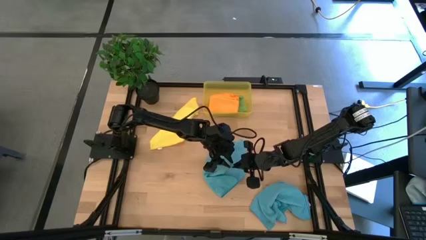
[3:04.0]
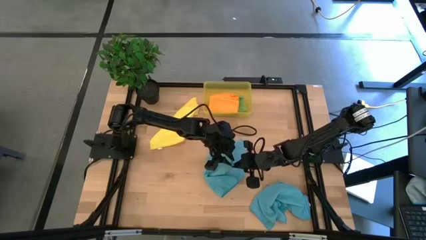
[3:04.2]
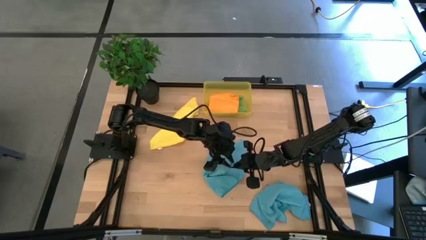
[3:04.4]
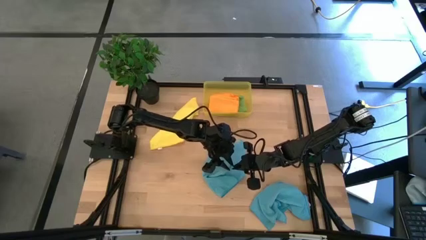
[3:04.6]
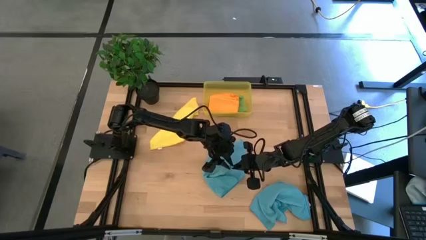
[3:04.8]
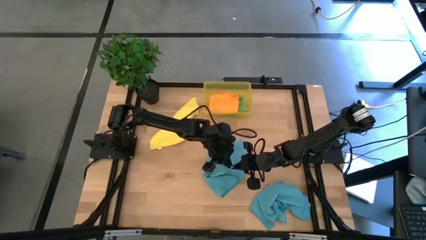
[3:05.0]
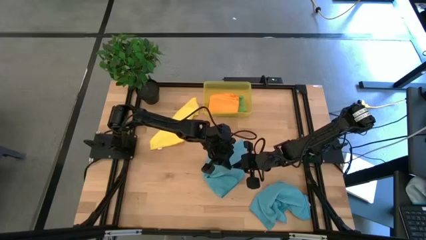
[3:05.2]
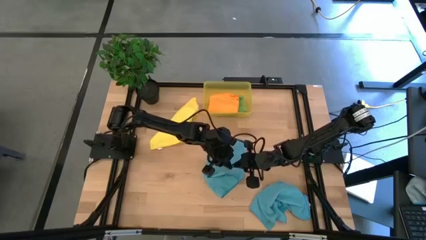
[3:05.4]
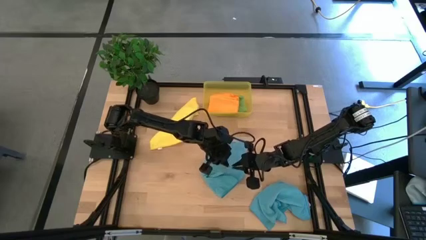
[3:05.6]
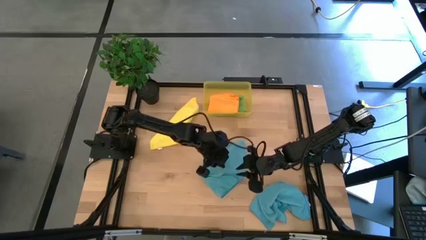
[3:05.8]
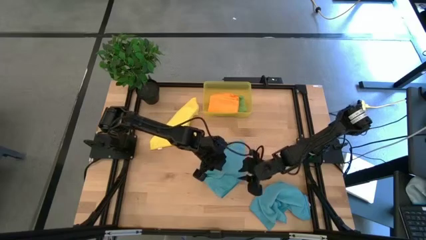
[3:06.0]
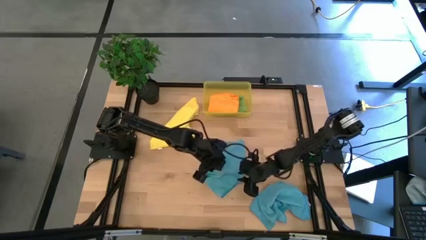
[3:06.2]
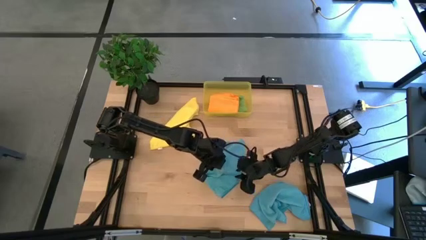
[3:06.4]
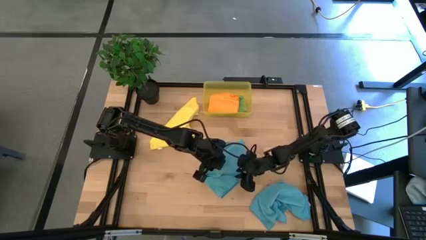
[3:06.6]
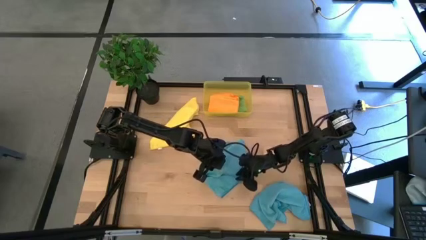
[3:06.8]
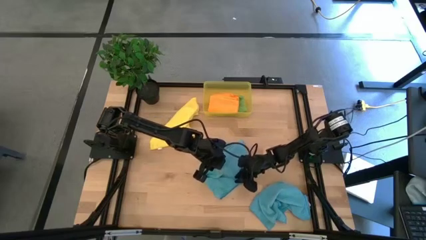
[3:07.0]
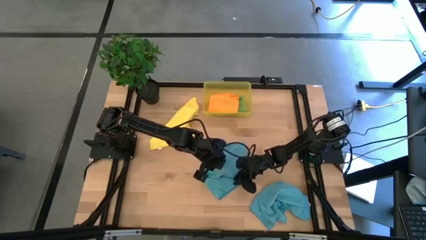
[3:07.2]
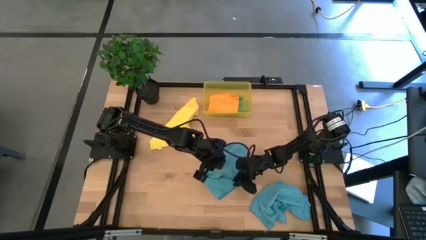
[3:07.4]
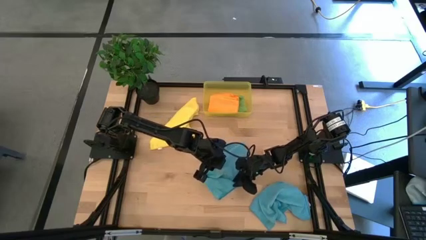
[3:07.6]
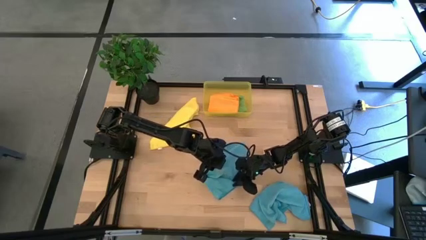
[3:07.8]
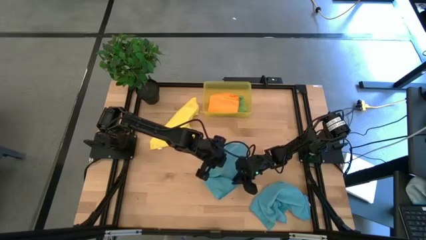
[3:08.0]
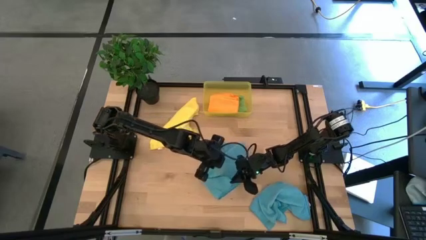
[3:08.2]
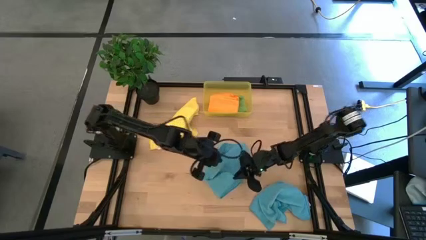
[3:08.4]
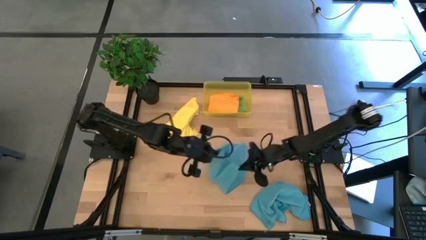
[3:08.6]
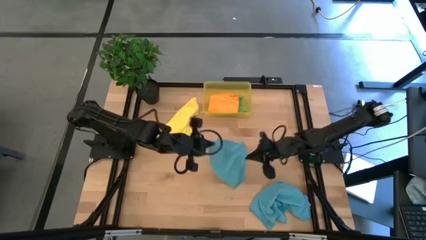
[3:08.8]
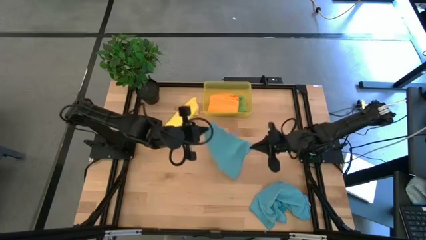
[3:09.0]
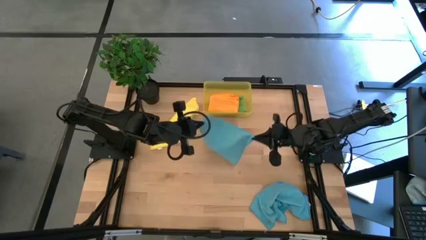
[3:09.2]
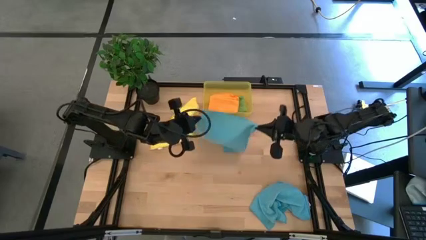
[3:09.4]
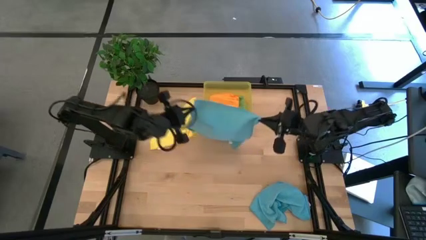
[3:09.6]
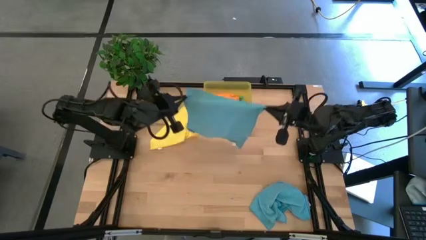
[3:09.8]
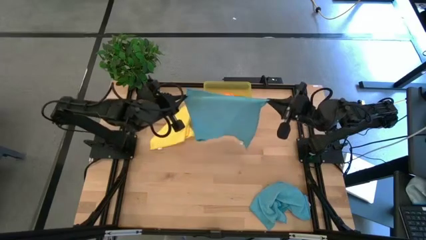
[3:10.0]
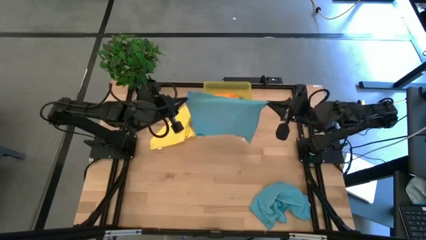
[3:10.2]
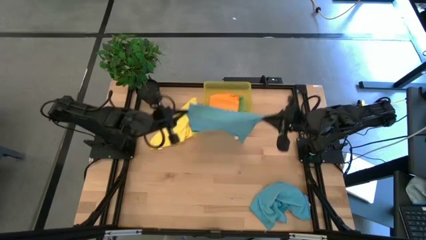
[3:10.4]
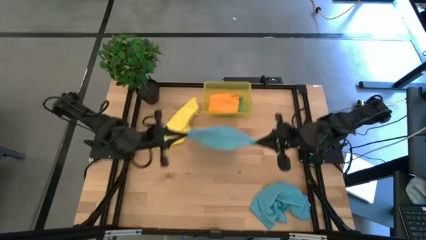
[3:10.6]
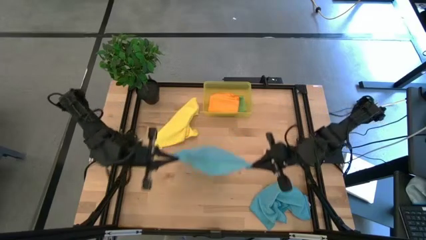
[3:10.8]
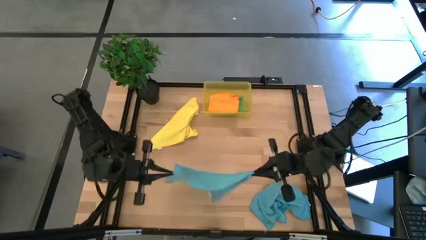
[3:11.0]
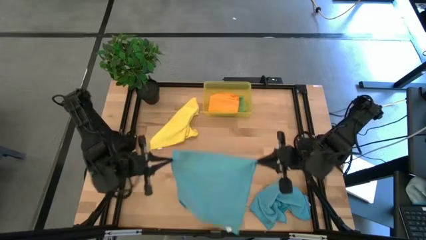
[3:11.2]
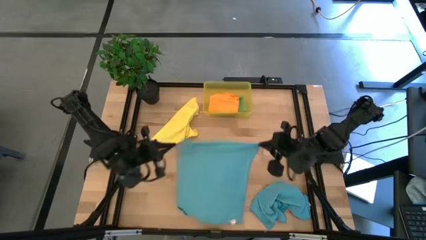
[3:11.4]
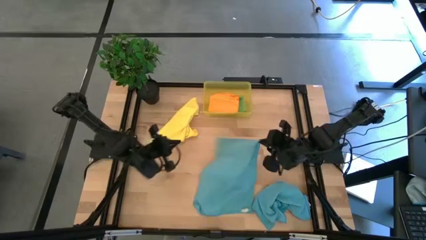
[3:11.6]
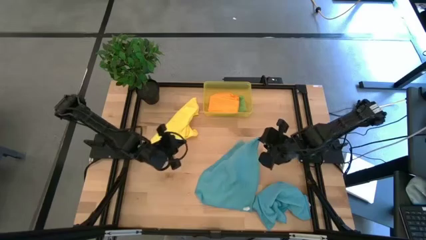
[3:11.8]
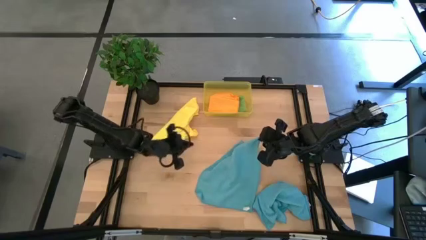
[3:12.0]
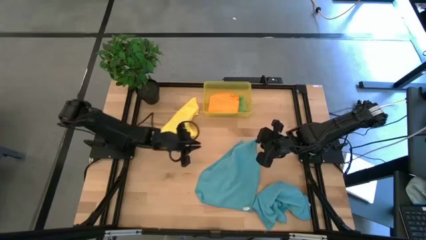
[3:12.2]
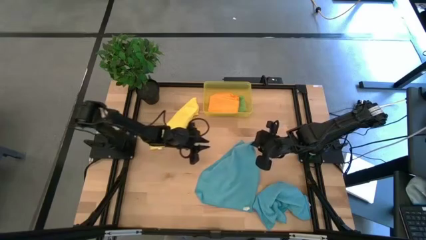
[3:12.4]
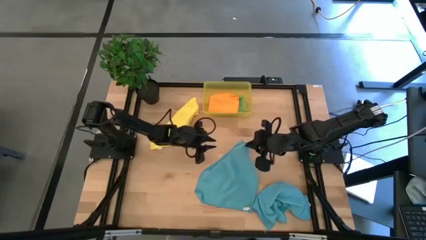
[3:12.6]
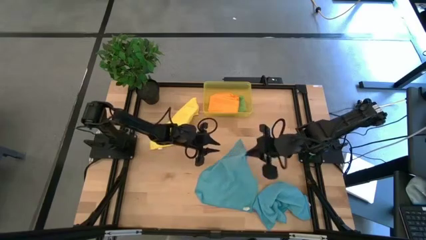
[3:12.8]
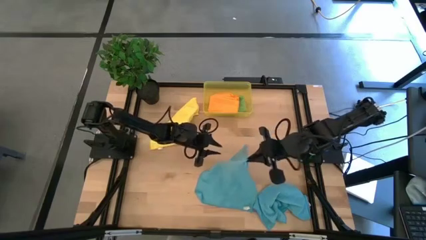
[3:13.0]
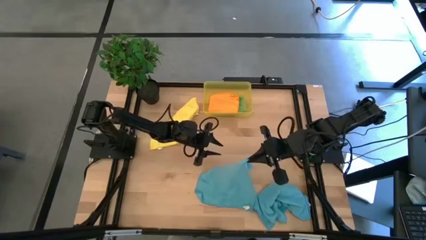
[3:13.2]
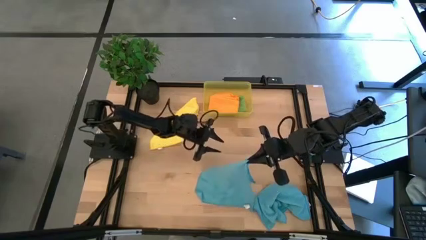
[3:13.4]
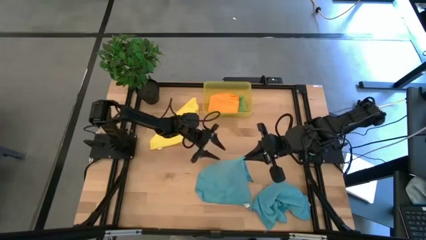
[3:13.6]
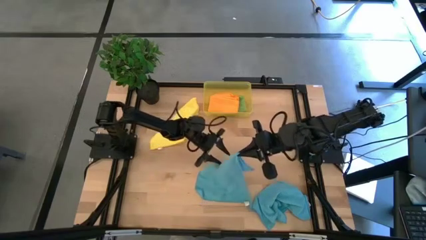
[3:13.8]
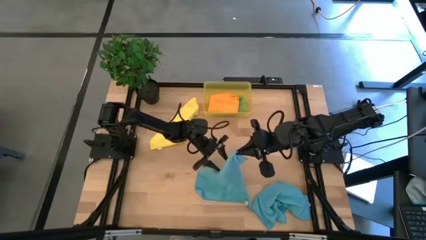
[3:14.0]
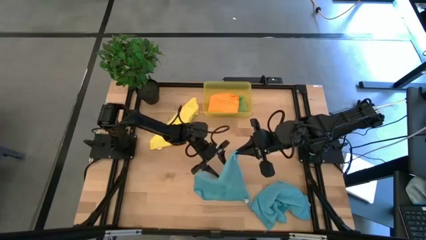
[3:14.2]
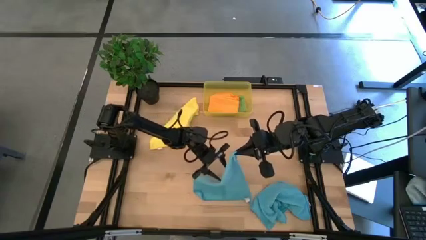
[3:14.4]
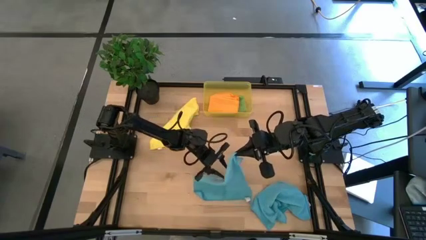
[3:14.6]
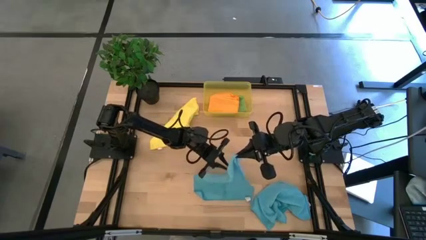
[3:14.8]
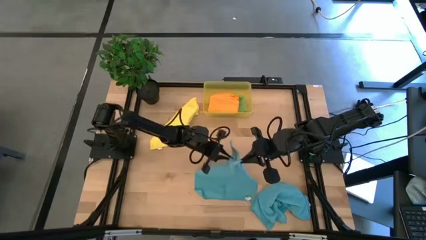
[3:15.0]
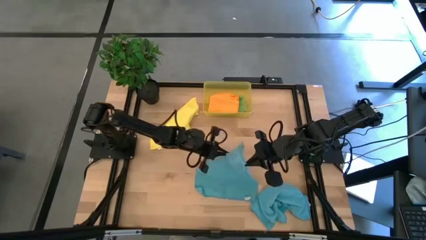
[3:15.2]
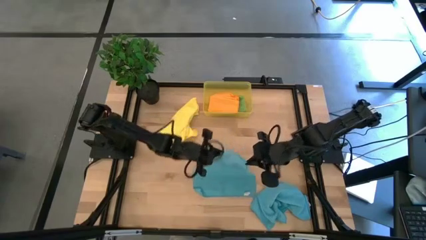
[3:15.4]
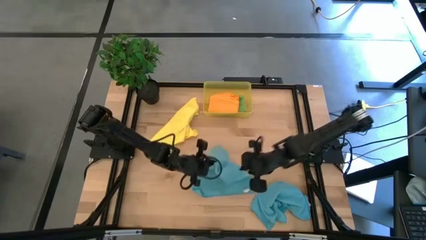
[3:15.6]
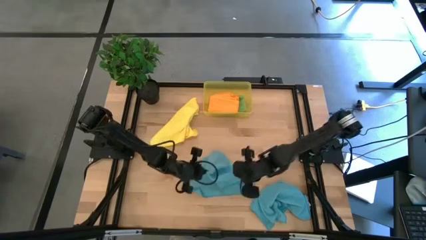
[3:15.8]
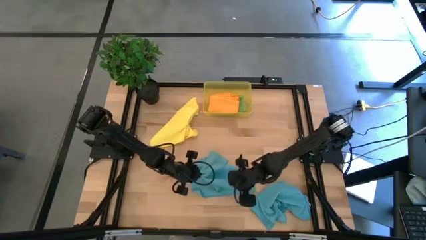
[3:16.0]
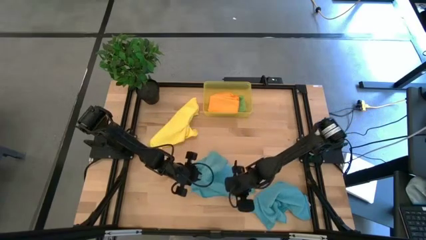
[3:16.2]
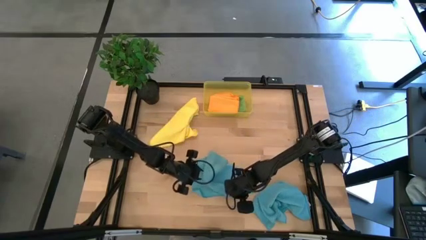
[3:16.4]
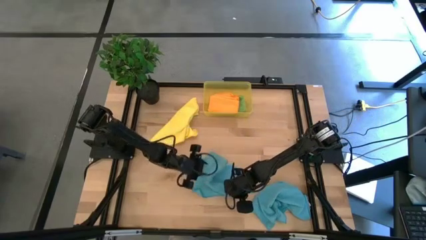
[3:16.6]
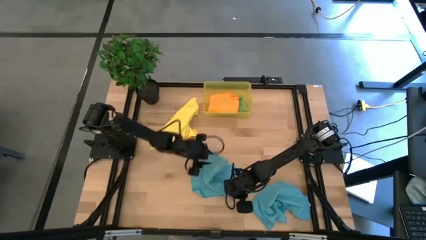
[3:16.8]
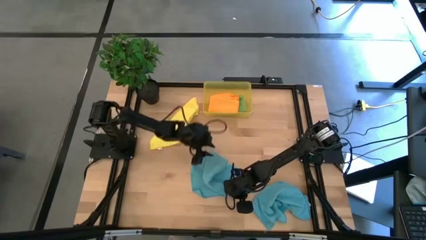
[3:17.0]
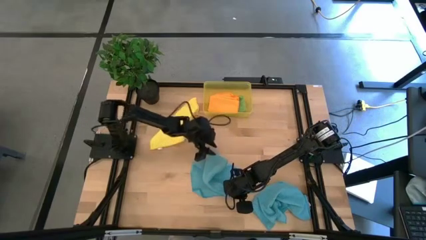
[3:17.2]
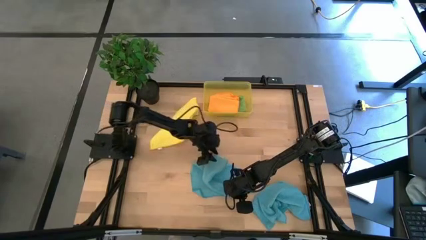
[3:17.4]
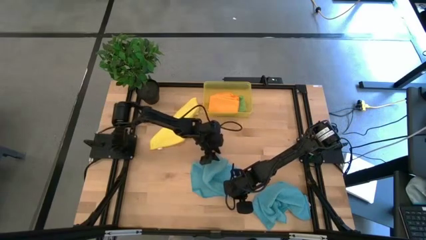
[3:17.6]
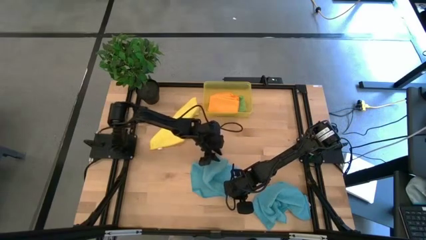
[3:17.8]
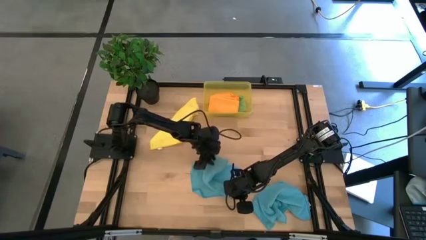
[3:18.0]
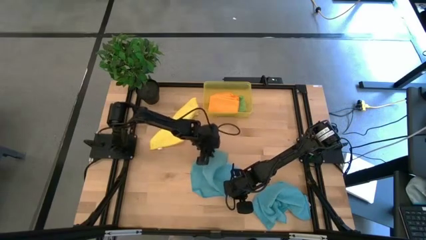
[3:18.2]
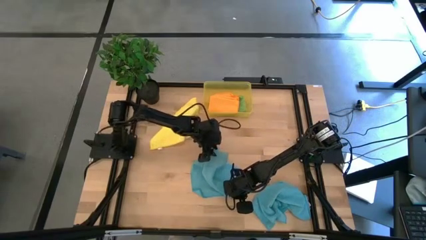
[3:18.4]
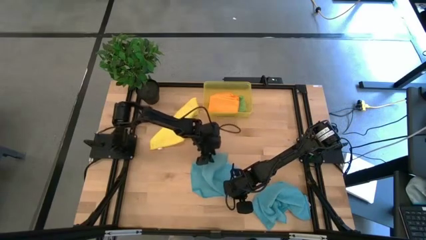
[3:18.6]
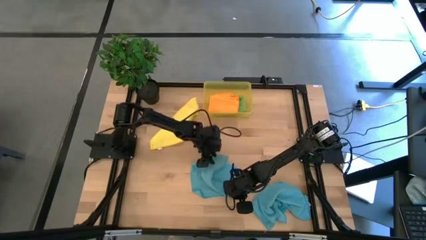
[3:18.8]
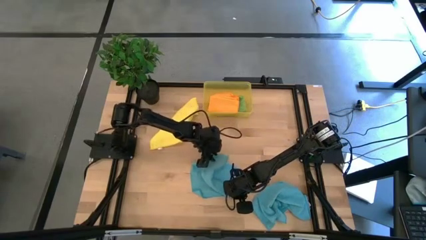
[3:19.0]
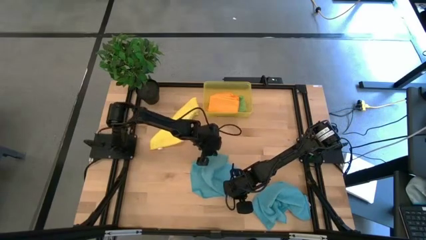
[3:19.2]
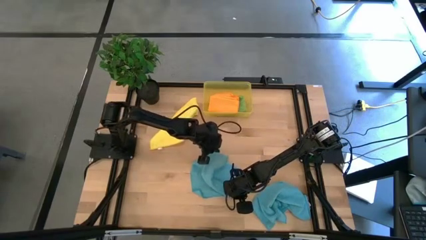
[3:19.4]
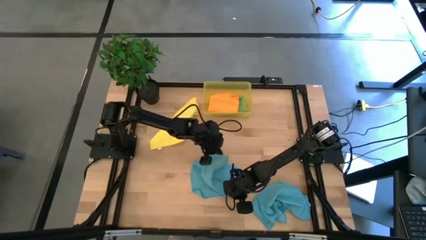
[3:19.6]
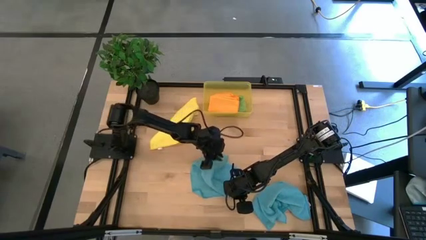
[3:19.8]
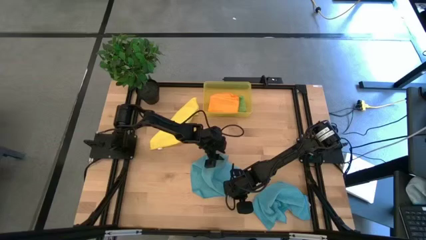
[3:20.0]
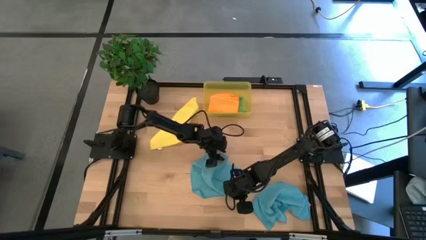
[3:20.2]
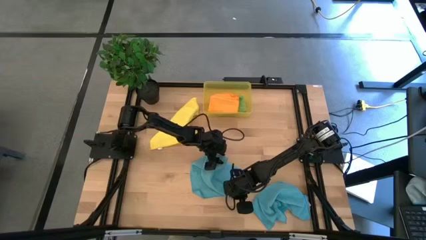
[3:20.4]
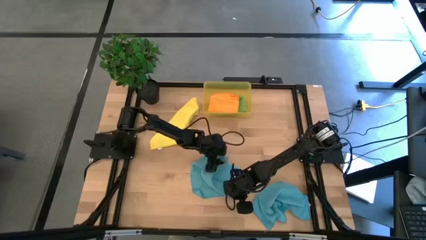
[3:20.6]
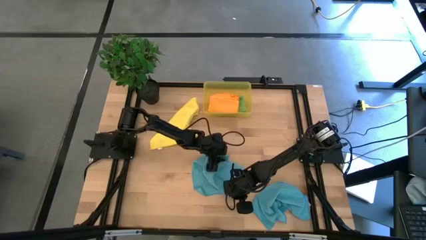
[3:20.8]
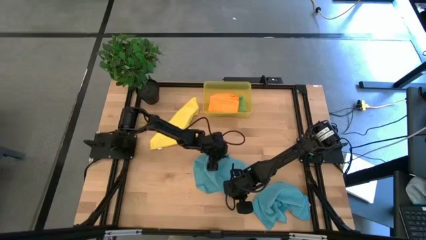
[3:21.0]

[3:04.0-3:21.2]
Task: Fold microfiber towels
Fold the top blue microfiber cloth
